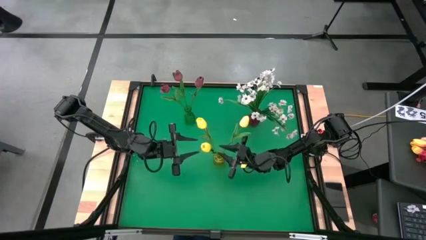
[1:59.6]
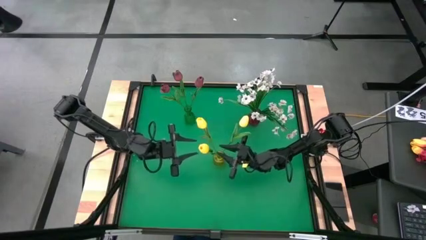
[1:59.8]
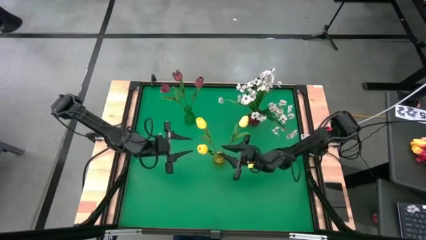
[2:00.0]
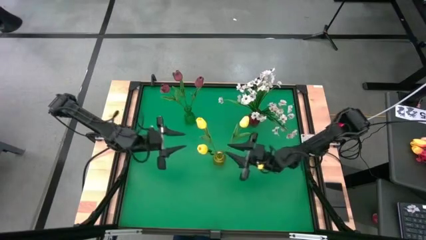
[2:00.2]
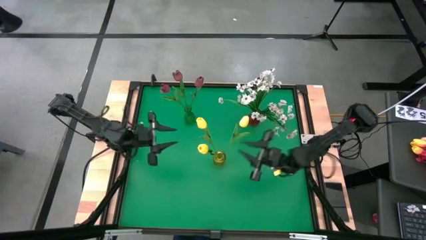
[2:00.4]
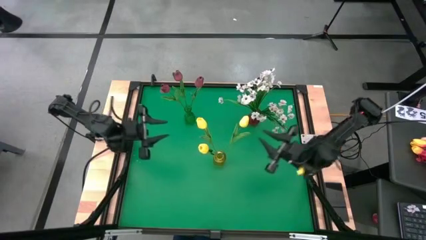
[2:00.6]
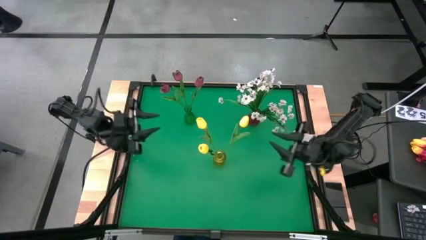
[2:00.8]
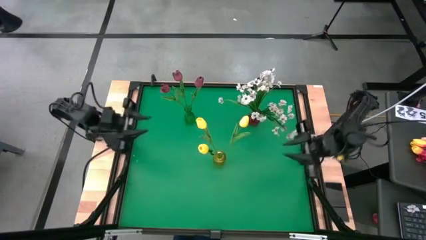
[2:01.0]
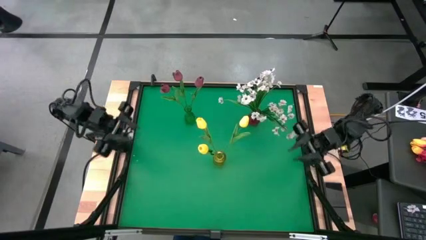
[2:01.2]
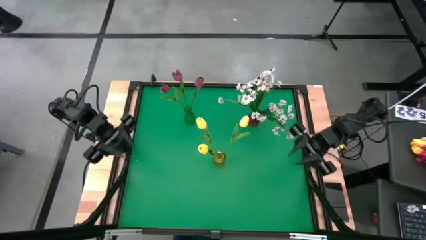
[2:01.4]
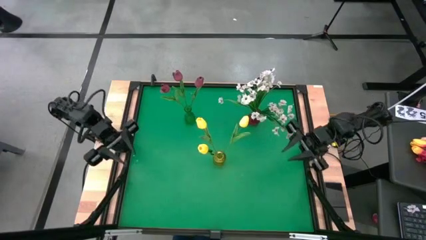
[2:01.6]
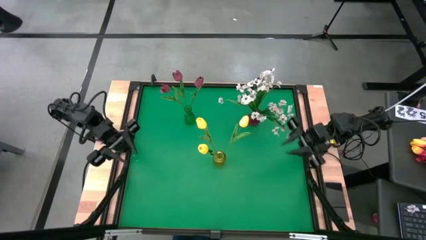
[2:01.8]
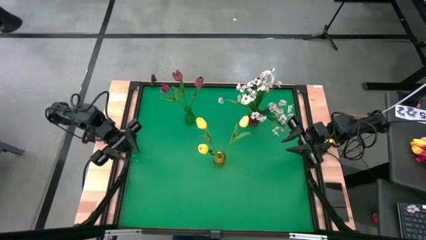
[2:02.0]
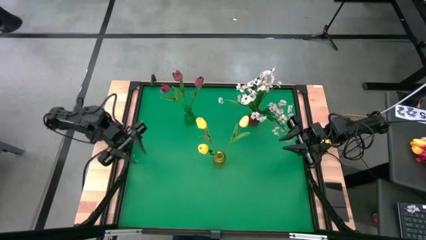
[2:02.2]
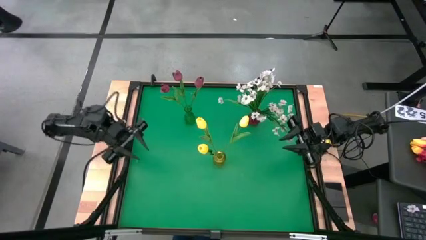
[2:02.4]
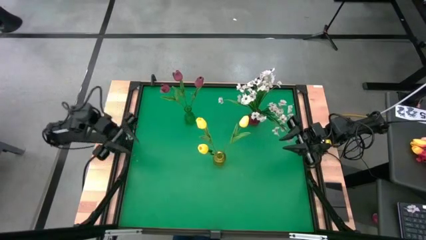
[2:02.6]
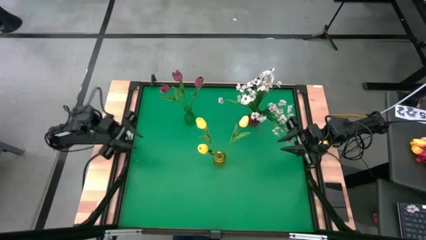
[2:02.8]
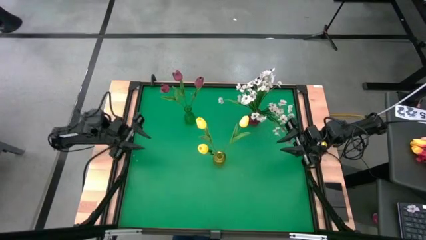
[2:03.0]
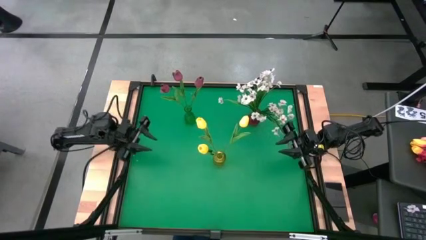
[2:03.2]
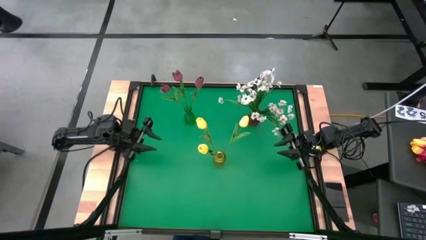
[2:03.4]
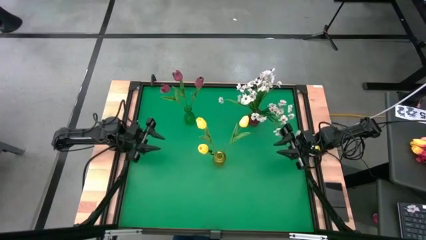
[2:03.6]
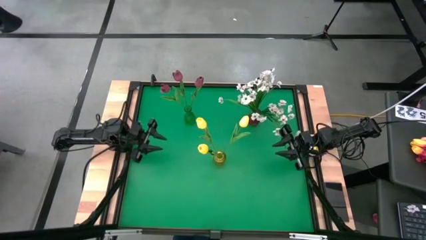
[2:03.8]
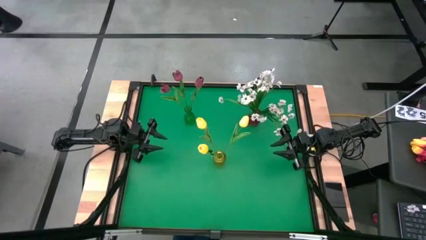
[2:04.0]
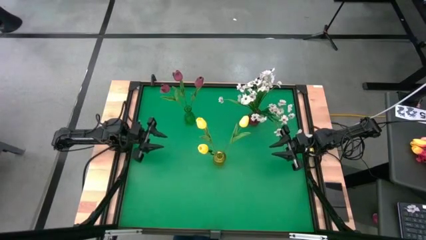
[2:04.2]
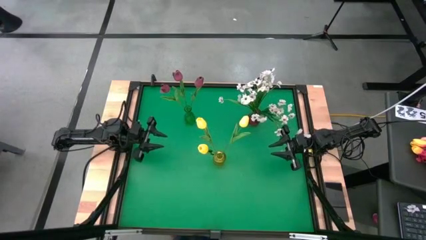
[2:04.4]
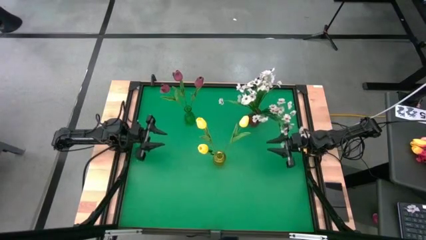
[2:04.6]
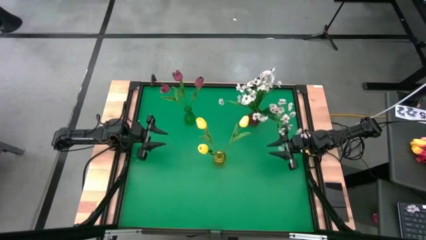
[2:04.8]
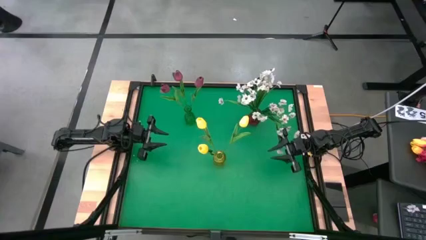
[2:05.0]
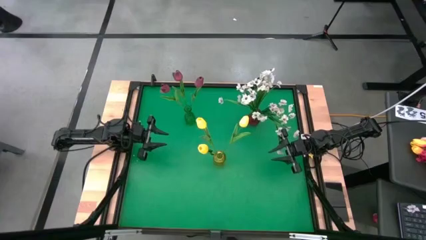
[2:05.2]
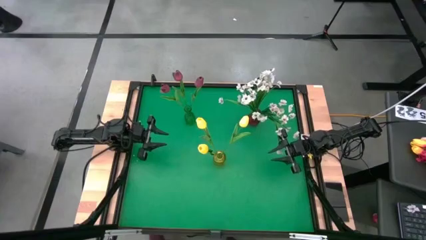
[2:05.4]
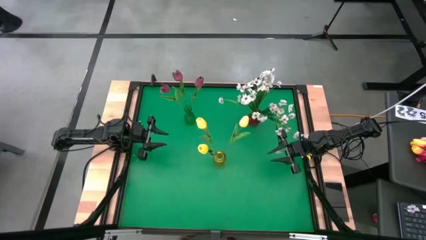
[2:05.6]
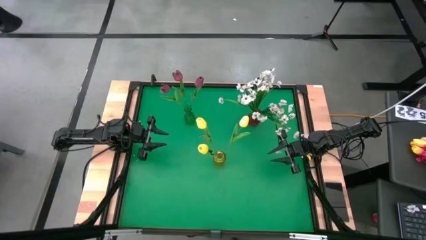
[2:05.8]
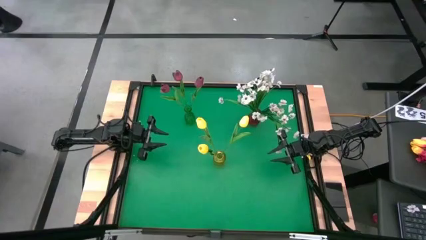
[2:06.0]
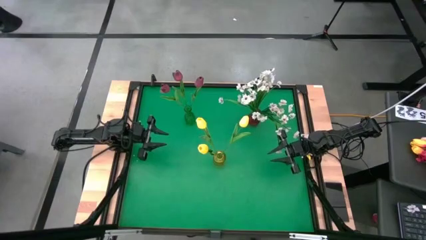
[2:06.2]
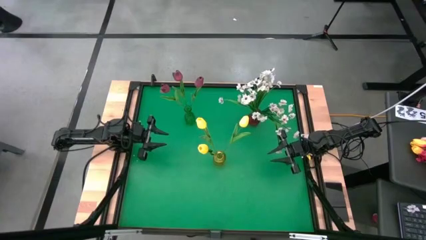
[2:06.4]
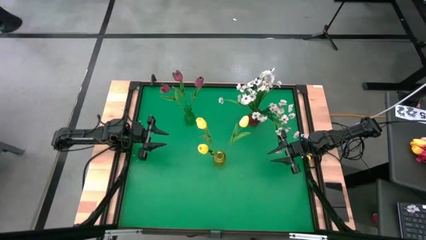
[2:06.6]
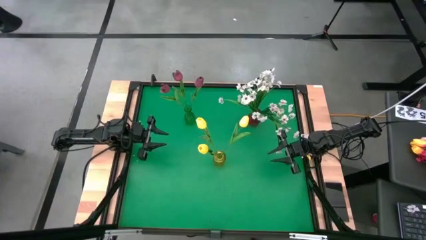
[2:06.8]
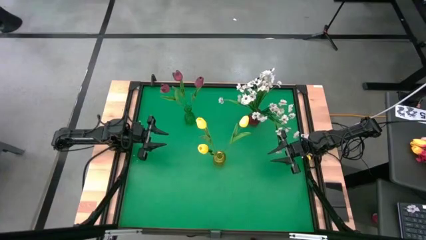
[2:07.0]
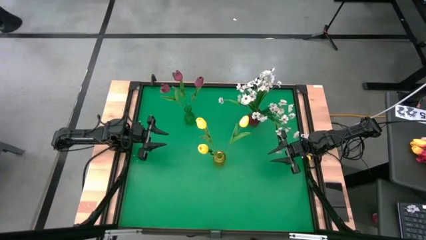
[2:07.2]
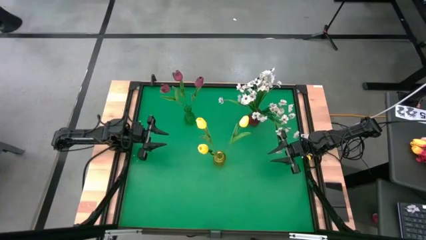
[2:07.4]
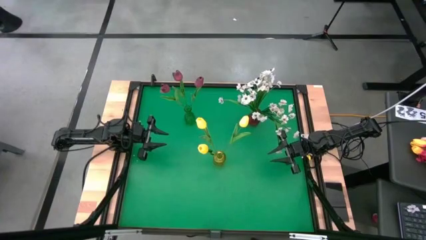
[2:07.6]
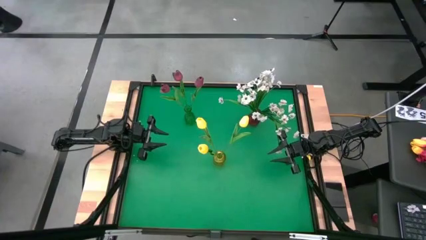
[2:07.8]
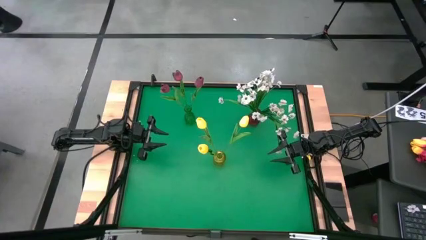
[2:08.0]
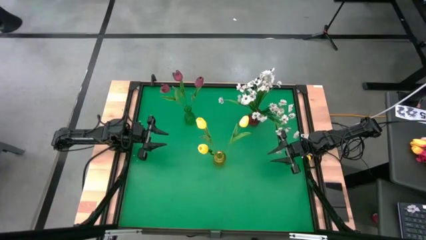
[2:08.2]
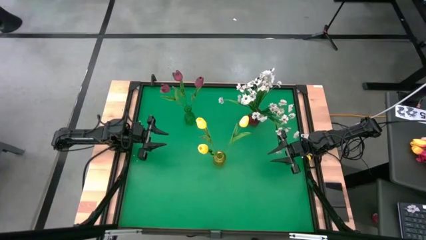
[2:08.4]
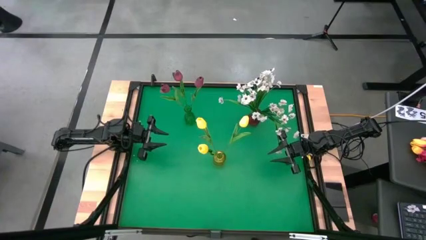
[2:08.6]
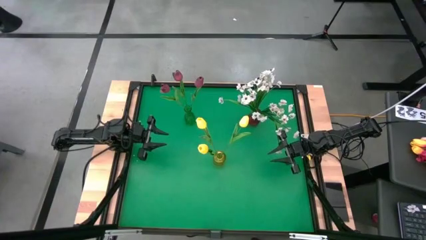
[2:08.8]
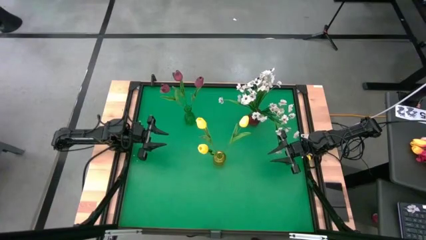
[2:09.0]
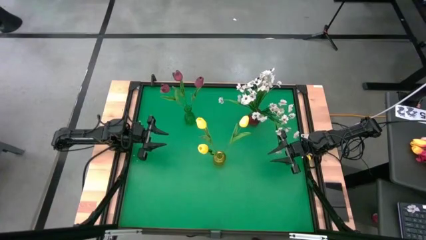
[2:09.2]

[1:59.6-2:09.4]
Task: Sort flowers into vase by color
Return to home position

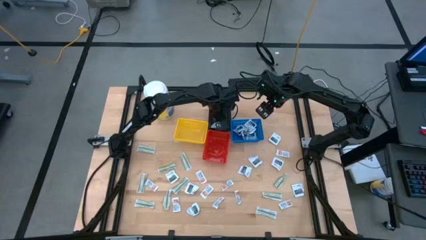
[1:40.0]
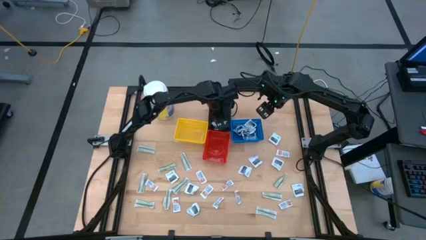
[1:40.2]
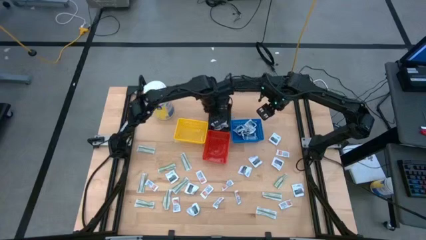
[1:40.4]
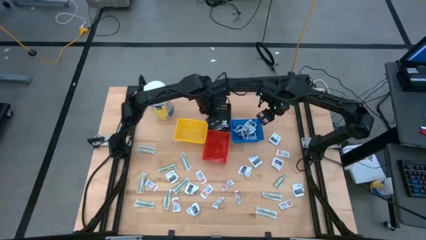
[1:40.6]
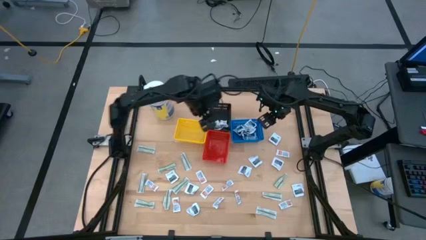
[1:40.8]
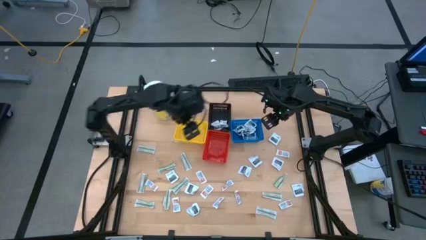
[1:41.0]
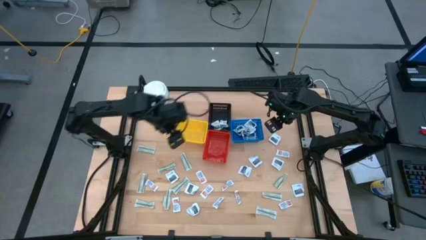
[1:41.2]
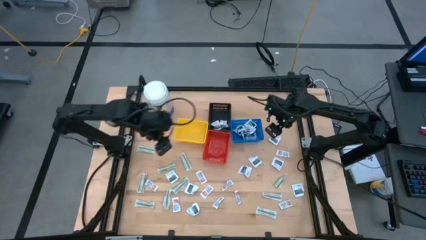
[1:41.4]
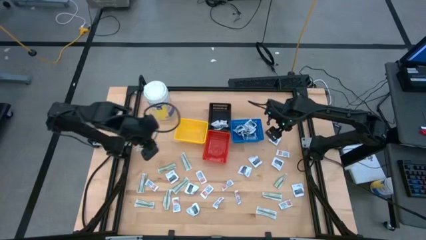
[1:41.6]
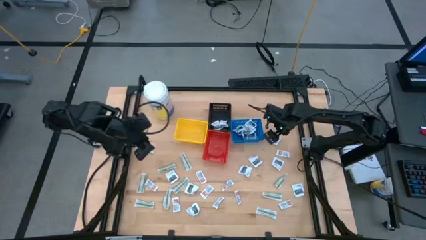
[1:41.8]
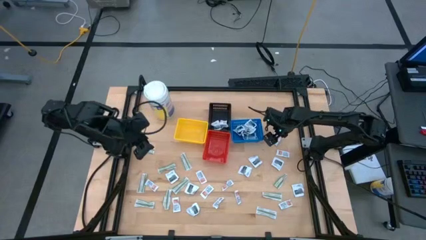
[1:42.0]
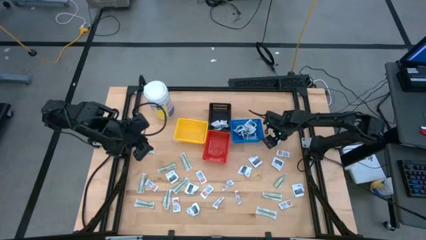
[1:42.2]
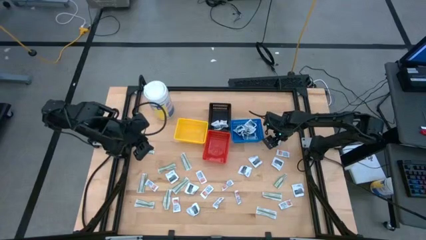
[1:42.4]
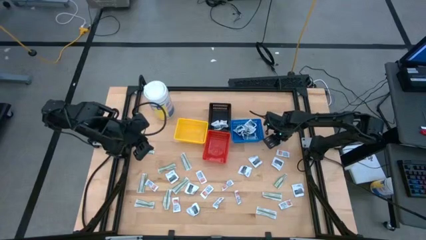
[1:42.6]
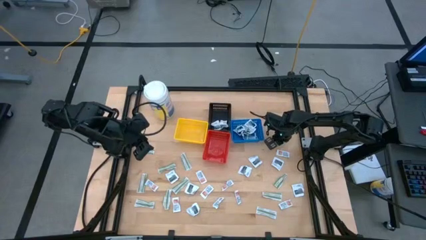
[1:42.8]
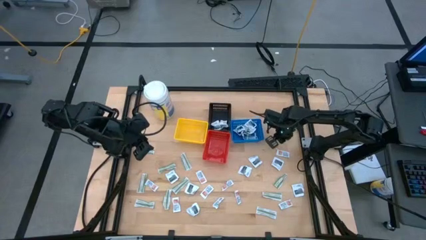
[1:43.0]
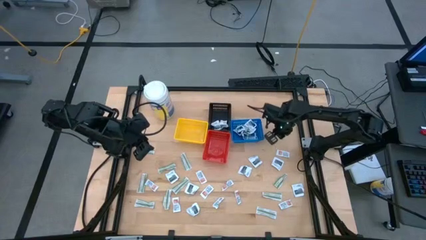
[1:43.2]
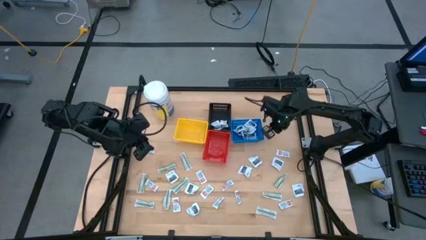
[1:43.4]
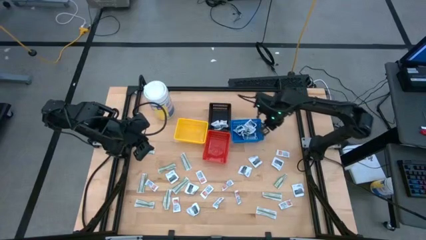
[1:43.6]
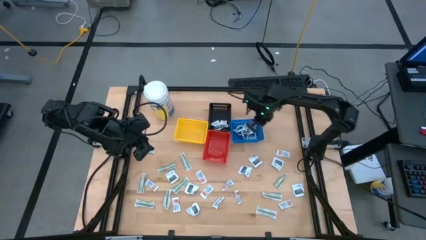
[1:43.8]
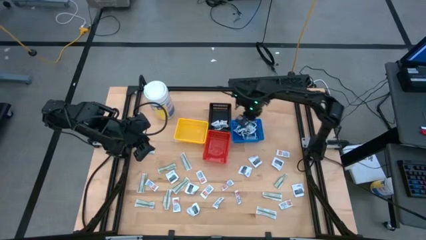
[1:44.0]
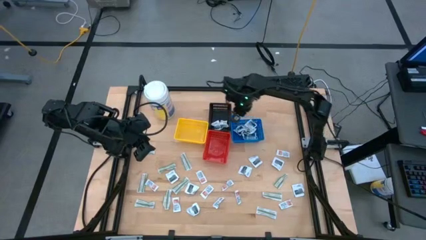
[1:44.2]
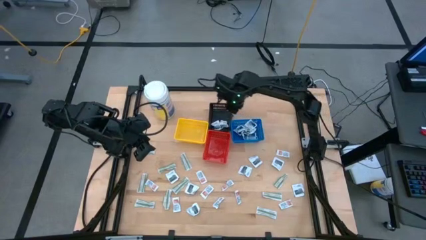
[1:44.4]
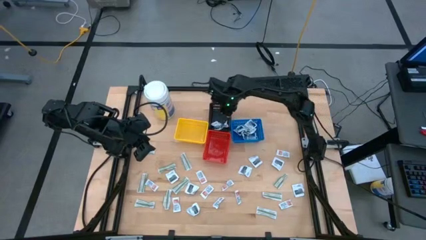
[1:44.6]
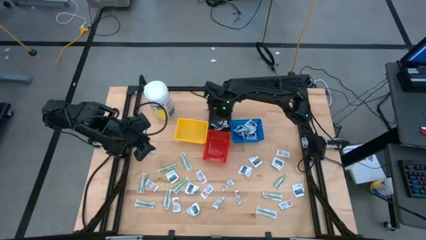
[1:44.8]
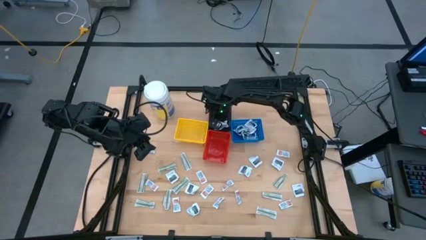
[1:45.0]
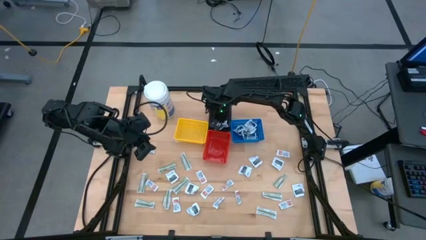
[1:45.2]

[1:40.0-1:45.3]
Task: Pick & Place First Aid Supplies
Put the towelette pack into the black bin
